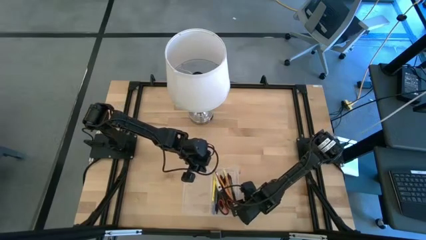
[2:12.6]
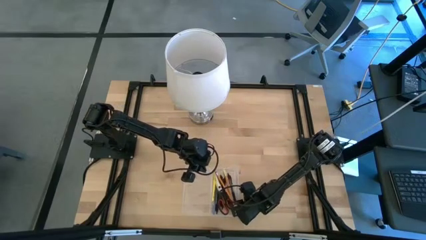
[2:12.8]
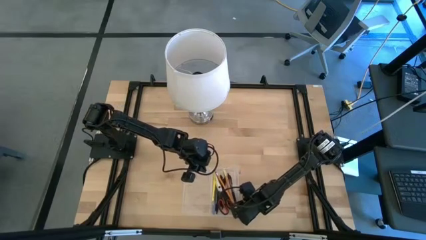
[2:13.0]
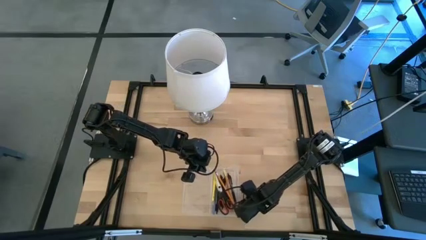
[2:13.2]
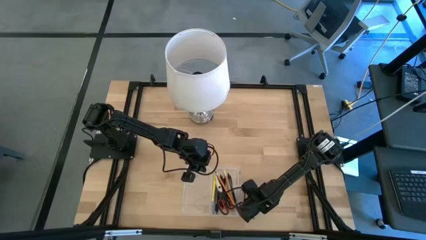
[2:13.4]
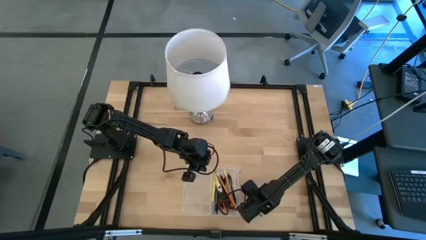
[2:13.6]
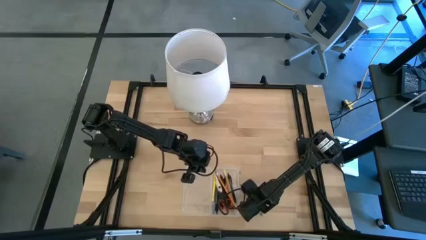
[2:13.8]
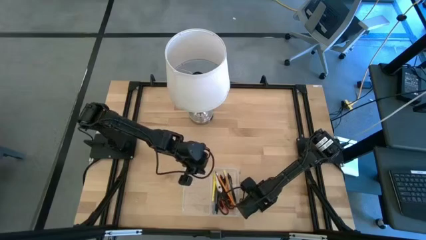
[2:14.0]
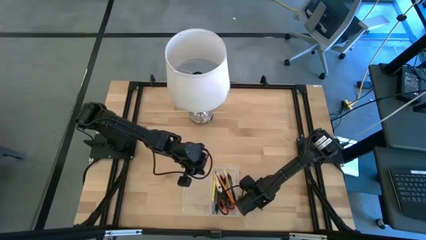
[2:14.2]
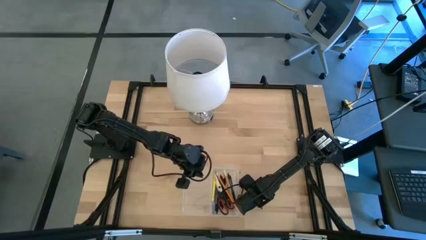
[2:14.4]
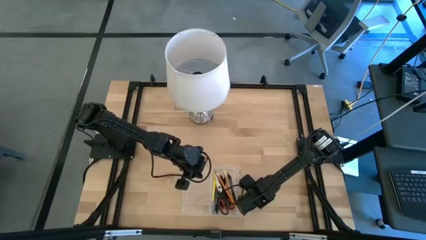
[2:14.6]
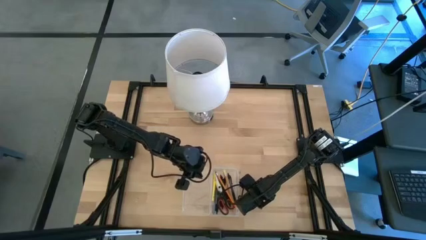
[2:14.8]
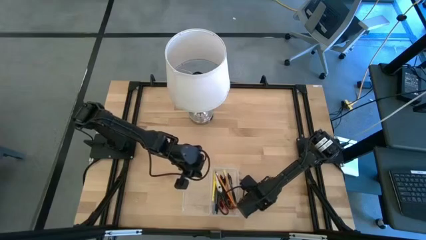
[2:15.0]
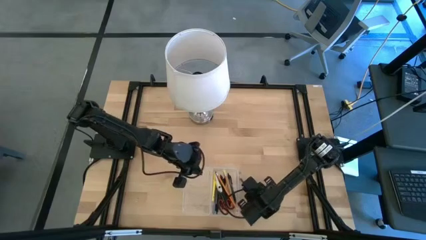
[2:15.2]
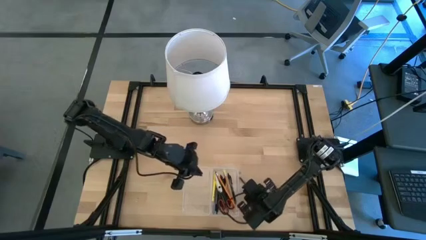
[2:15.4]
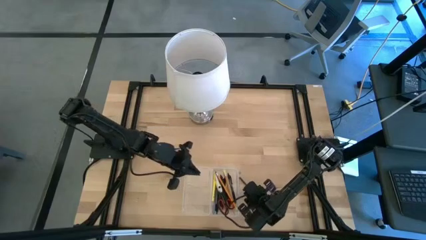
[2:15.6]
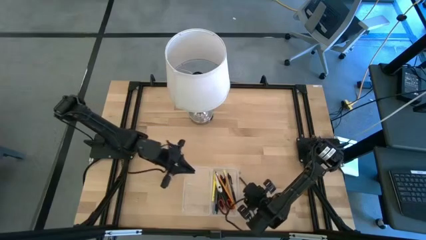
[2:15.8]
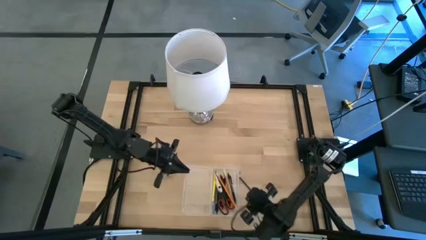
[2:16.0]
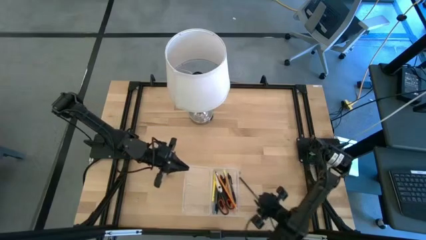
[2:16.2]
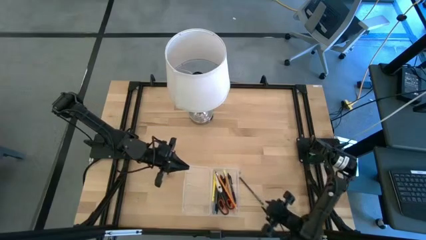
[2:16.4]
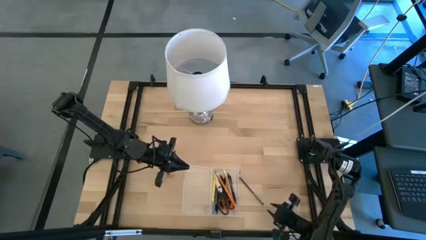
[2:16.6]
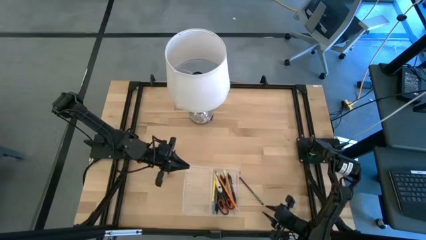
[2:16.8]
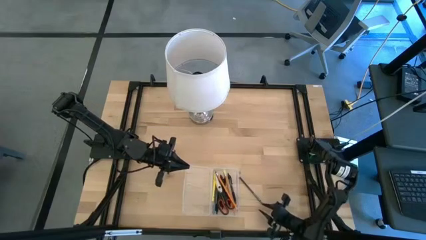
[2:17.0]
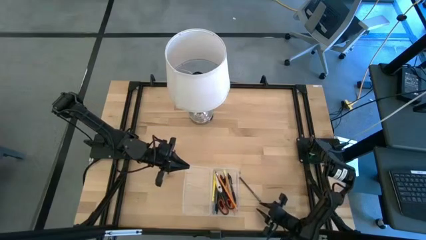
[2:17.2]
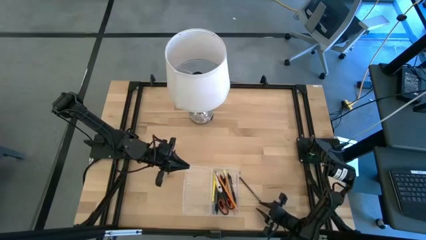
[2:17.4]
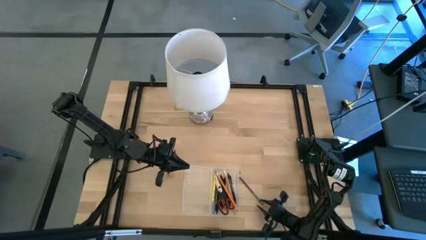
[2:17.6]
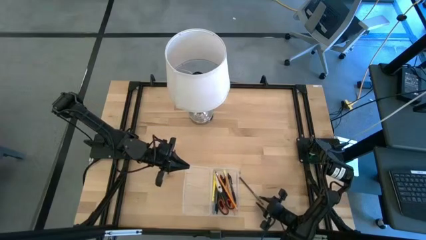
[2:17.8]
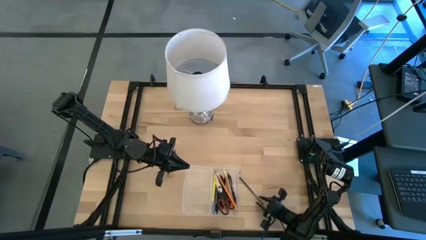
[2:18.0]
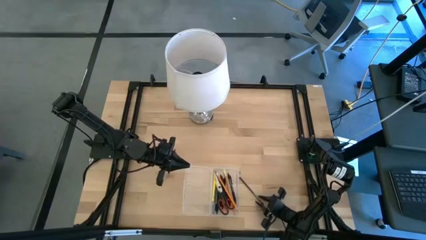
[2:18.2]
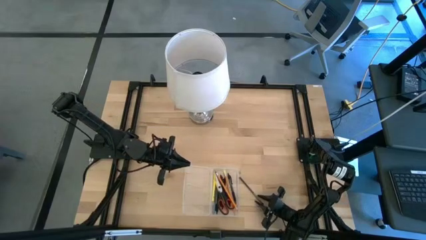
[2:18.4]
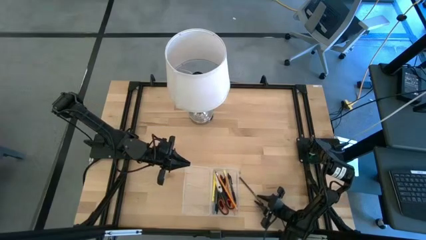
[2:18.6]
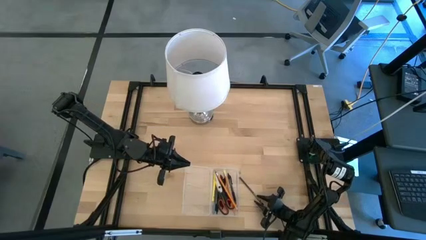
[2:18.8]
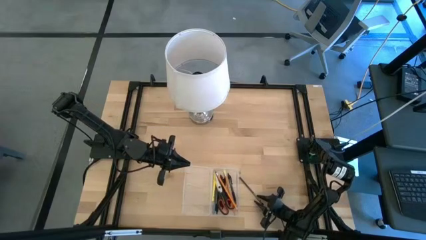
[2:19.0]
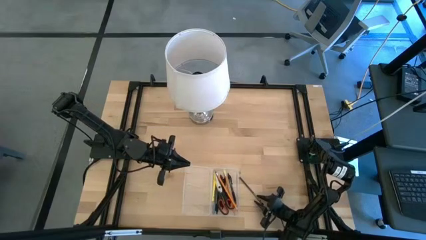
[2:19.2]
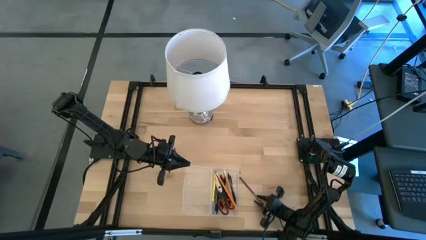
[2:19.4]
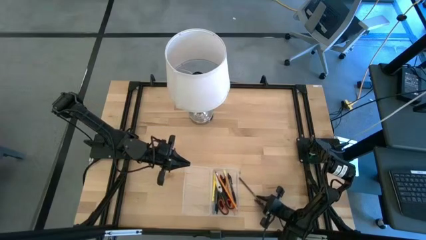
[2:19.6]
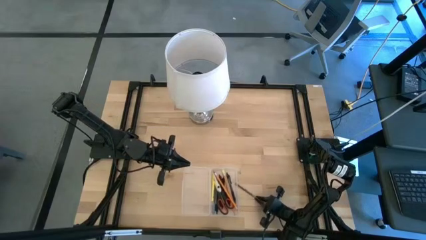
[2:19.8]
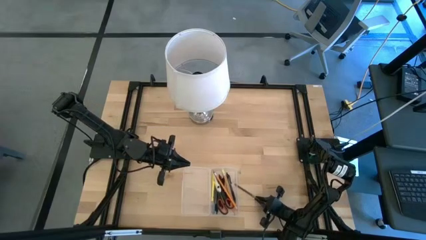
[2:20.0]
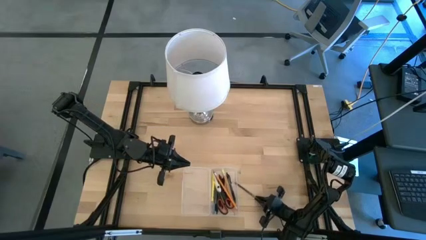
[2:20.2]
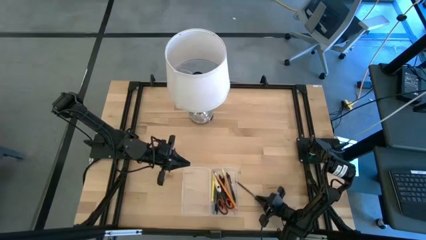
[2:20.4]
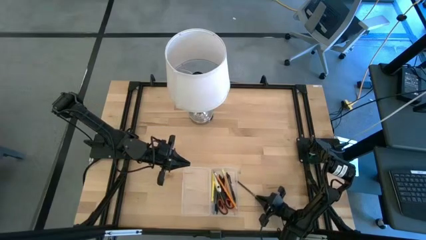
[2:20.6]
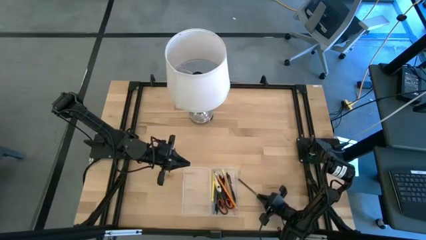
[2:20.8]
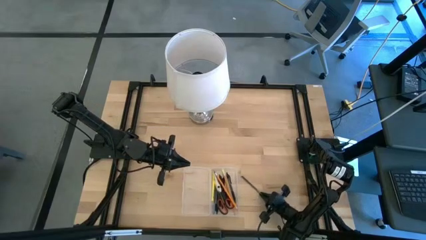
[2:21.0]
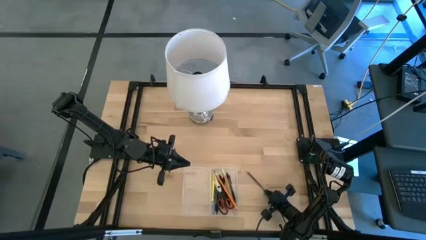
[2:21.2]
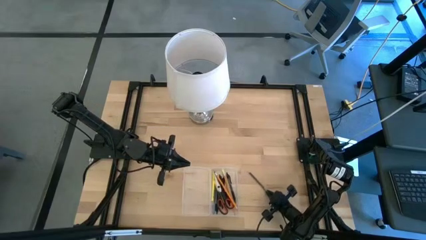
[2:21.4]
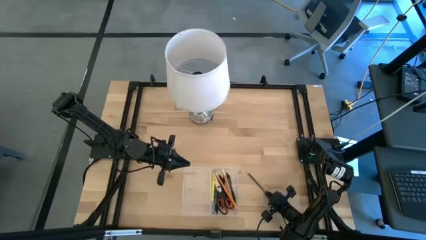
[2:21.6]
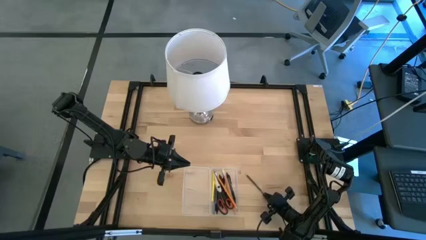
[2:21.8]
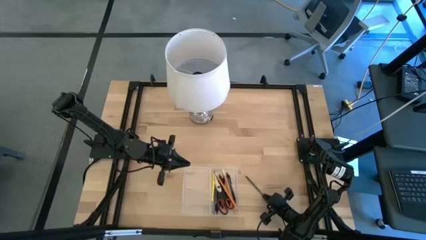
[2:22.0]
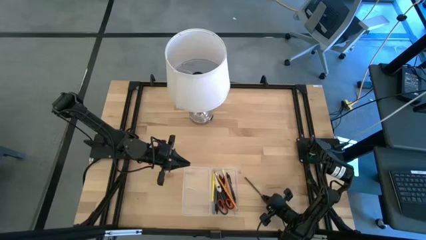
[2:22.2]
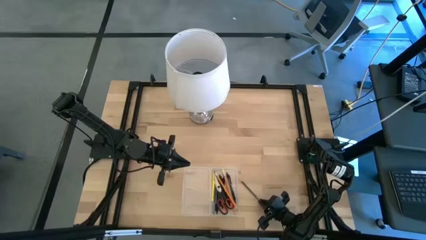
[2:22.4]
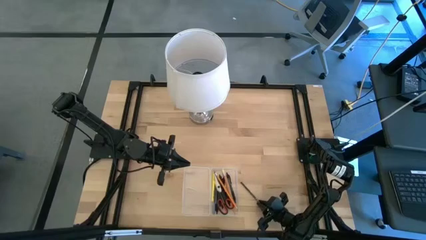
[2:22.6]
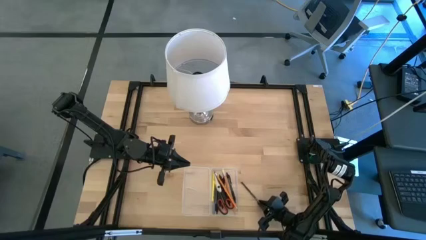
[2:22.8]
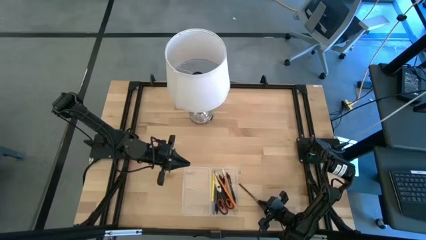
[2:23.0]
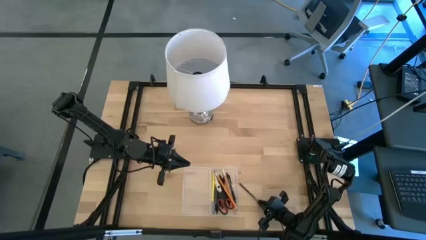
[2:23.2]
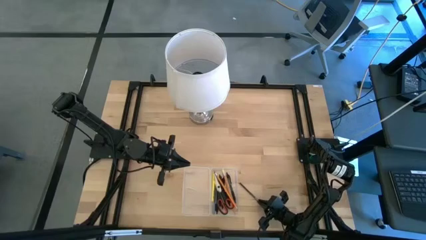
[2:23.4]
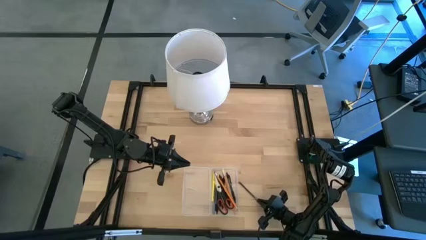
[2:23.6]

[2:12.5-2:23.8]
Task: Pick & place school supplies into a supply box
Put the black pencil into the transparent supply box

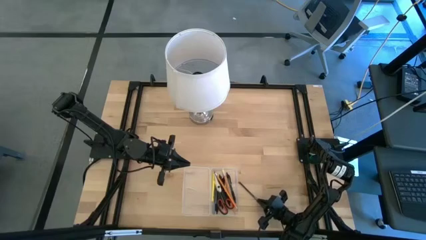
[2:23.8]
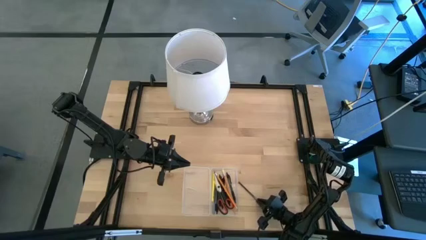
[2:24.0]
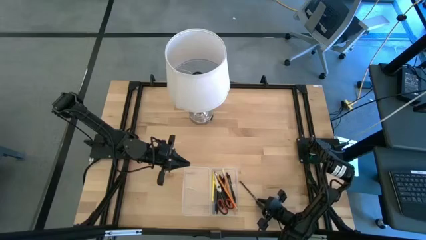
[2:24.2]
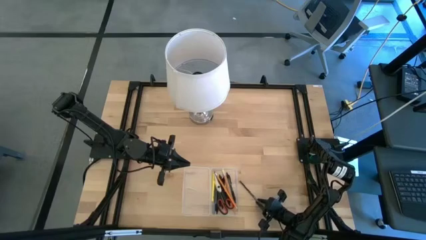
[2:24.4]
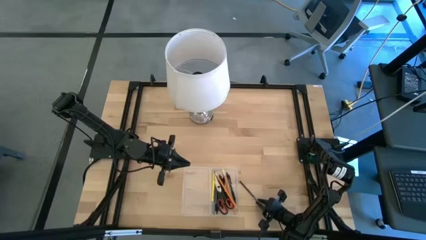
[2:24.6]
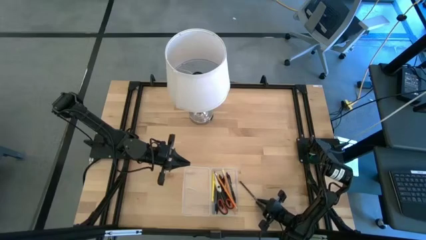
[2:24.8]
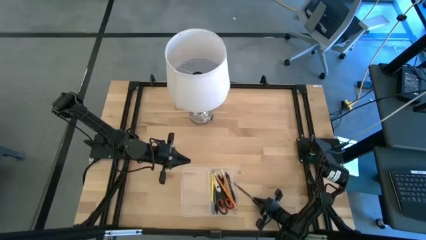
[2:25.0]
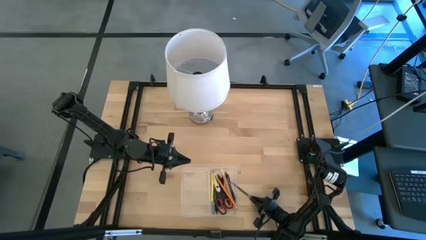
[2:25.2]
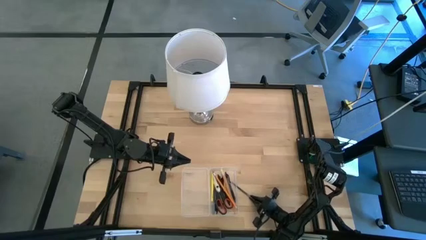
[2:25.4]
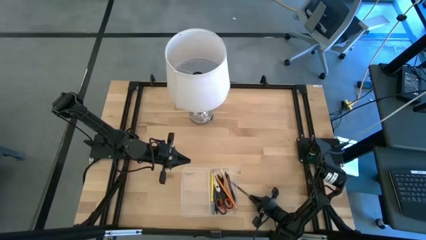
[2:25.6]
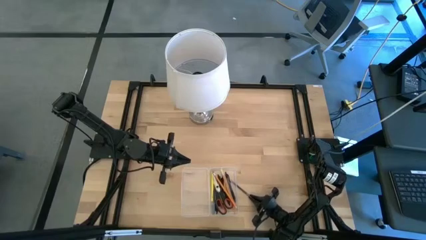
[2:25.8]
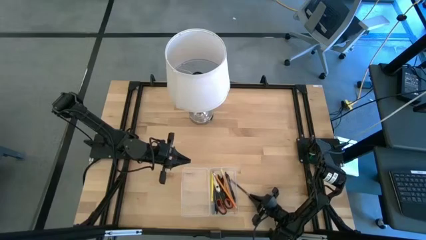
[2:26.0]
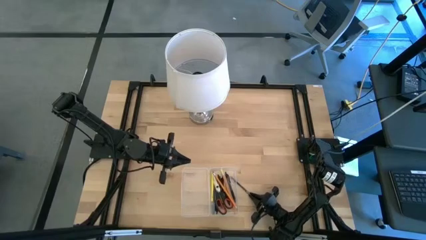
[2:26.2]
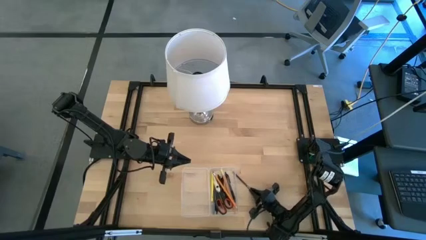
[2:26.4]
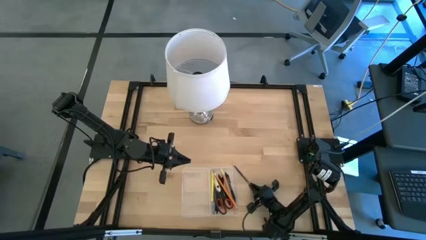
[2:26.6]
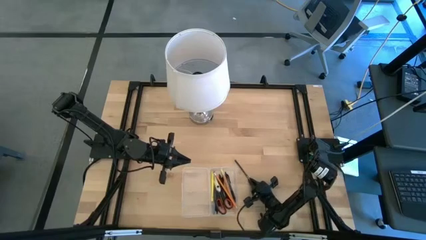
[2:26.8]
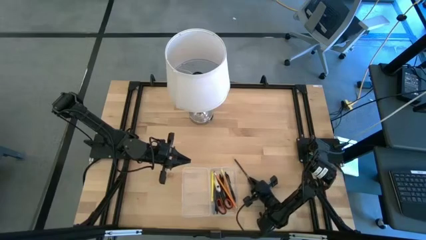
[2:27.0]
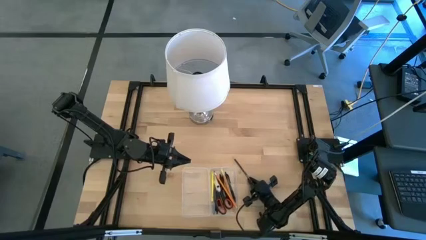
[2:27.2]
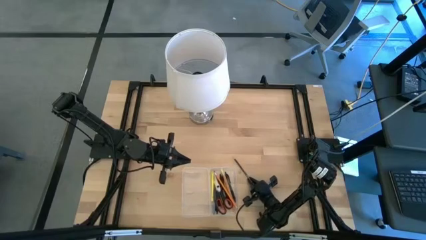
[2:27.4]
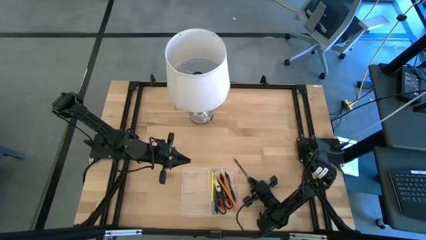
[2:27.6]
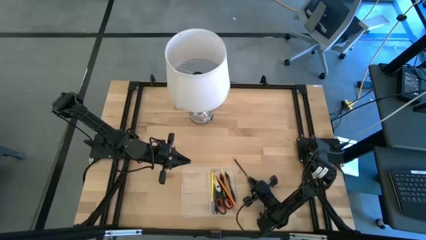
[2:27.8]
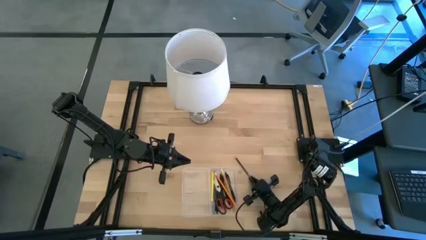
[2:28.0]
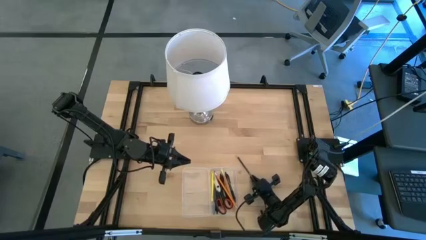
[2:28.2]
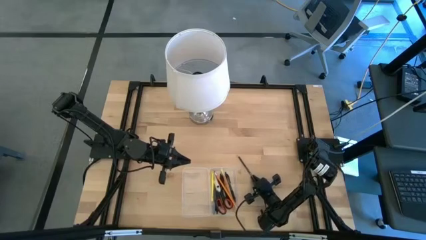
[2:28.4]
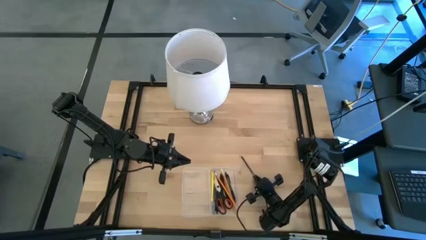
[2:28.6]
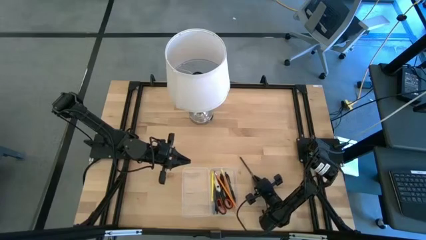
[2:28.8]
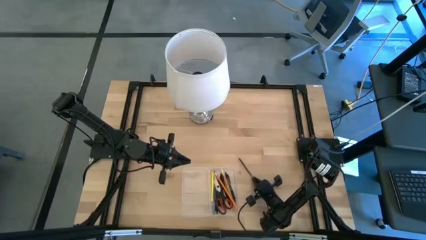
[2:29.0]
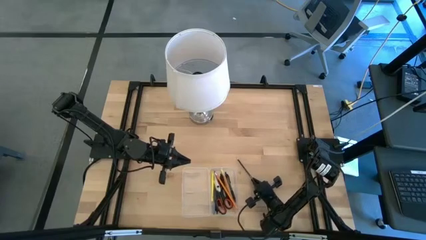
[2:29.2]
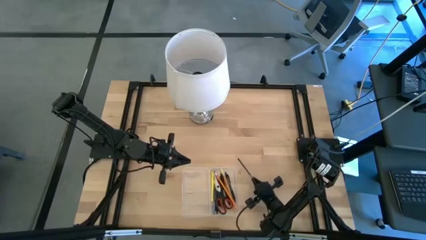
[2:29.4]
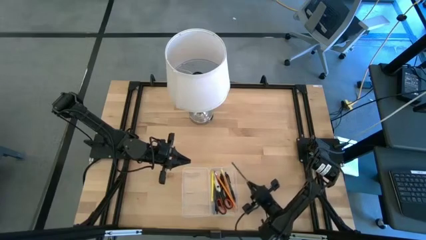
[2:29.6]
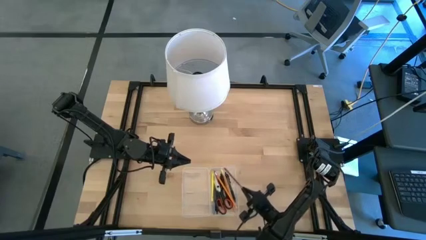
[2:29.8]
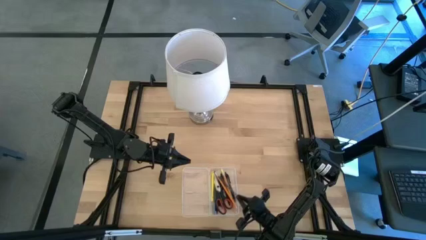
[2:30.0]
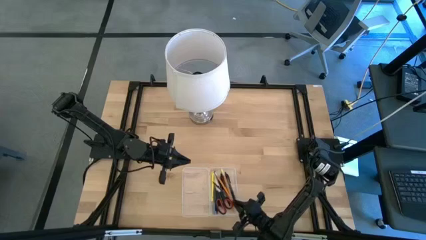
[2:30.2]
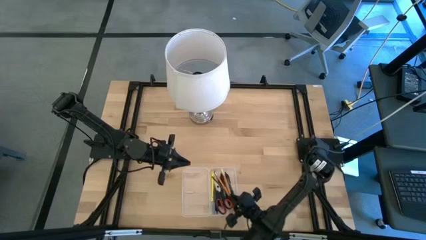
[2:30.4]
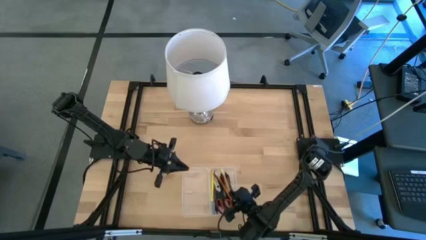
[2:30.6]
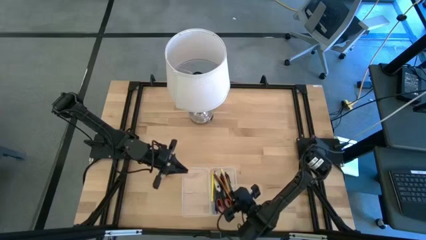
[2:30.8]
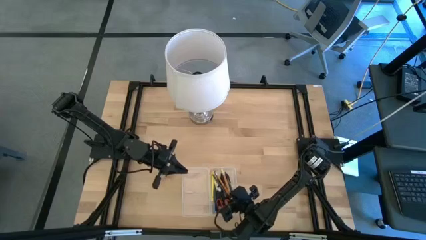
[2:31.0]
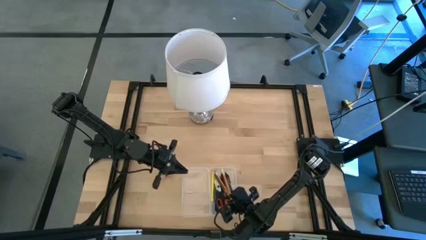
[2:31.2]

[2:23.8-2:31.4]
Put the black pencil into the transparent supply box
